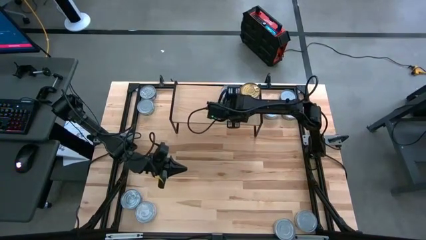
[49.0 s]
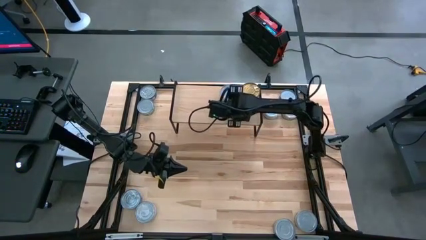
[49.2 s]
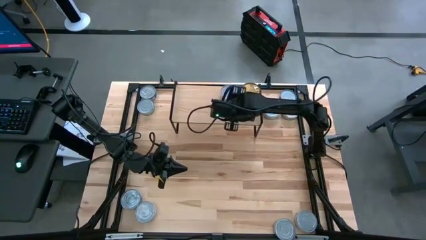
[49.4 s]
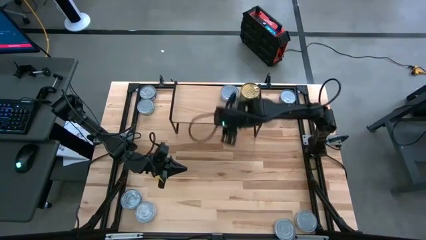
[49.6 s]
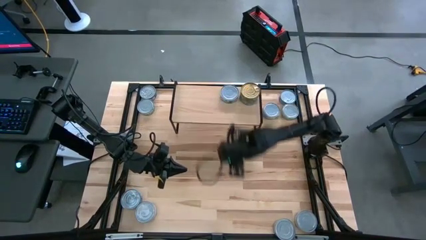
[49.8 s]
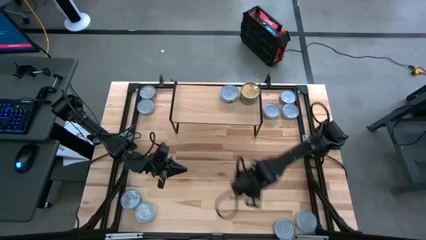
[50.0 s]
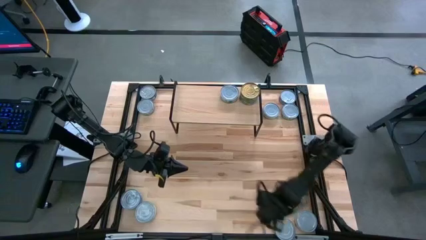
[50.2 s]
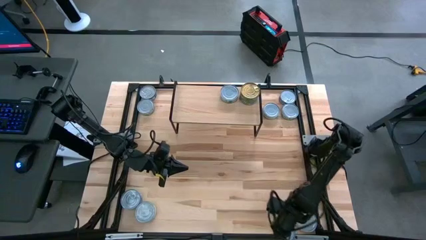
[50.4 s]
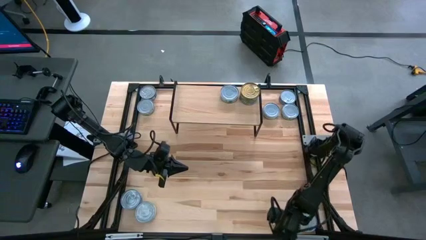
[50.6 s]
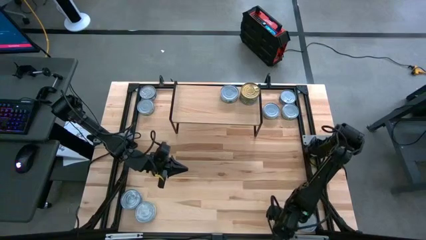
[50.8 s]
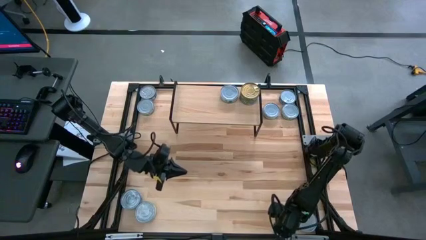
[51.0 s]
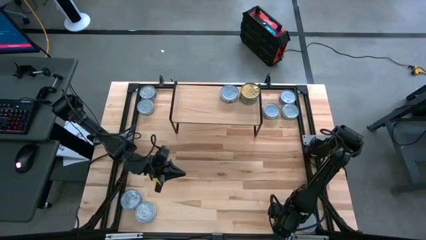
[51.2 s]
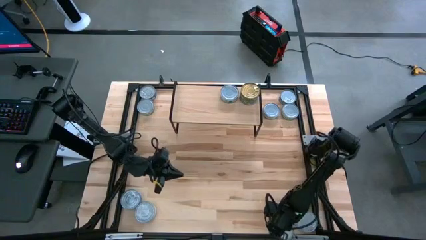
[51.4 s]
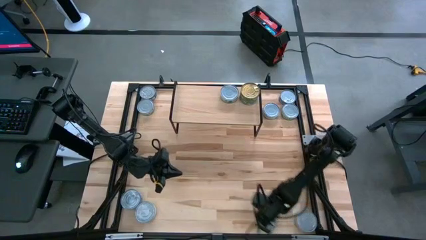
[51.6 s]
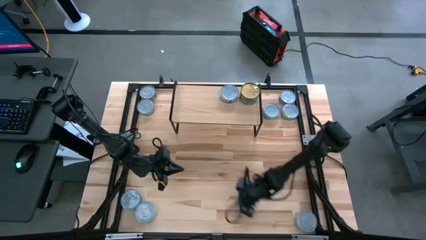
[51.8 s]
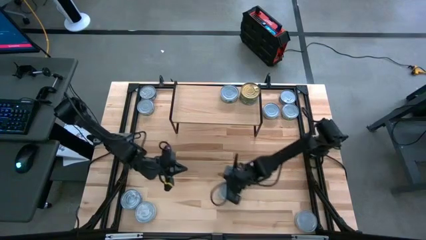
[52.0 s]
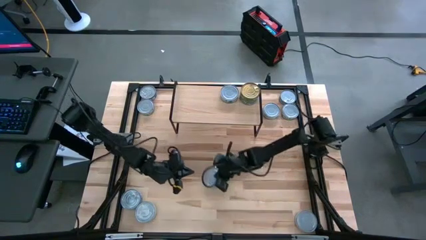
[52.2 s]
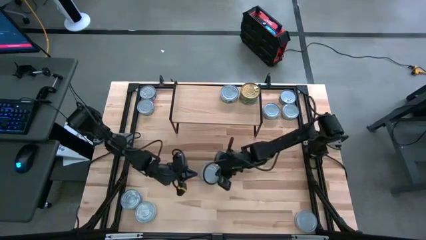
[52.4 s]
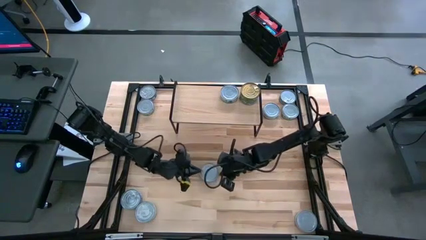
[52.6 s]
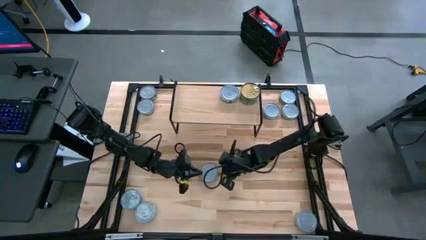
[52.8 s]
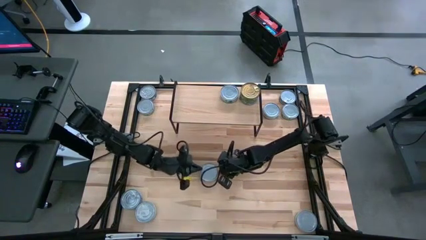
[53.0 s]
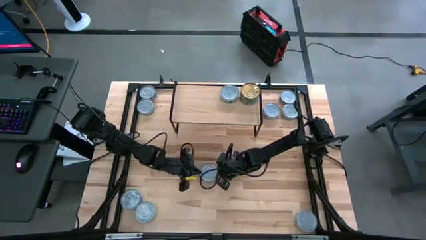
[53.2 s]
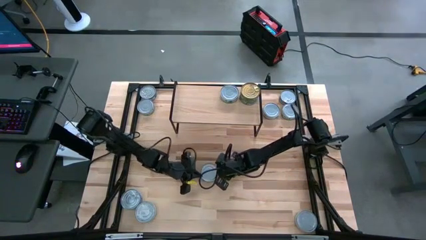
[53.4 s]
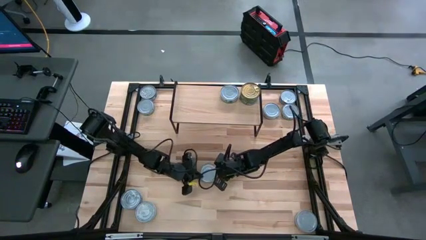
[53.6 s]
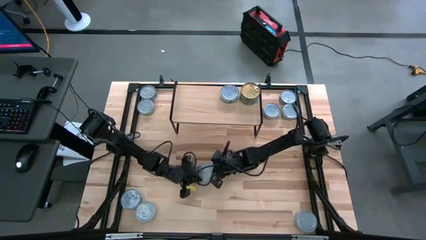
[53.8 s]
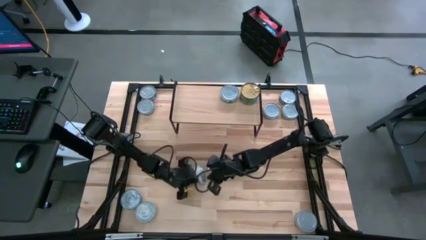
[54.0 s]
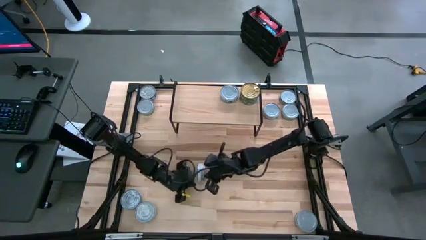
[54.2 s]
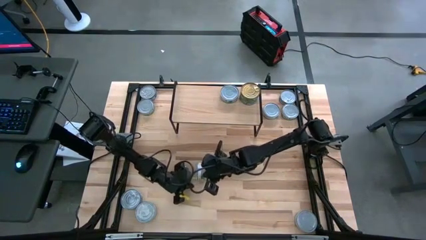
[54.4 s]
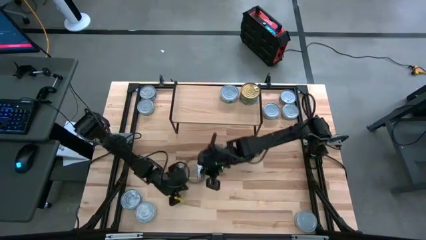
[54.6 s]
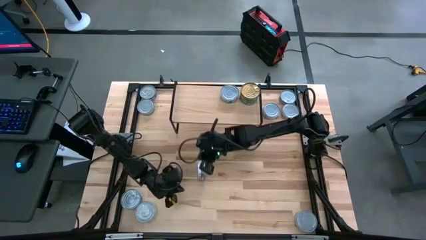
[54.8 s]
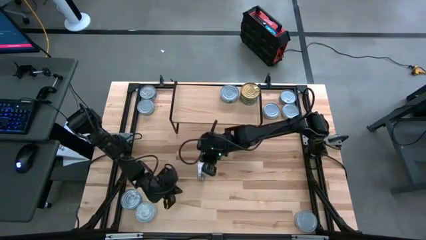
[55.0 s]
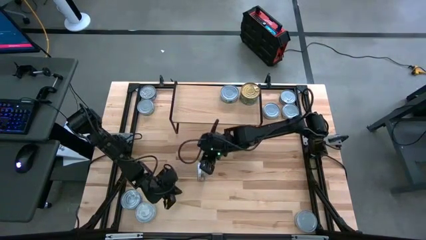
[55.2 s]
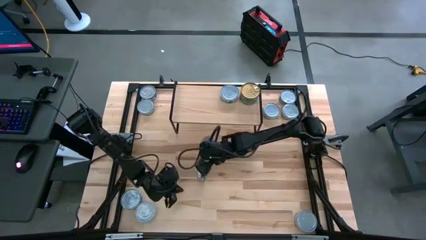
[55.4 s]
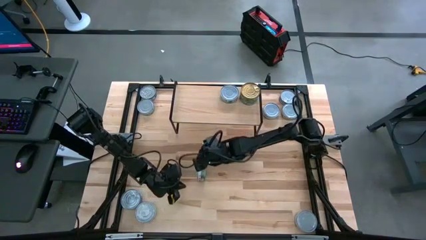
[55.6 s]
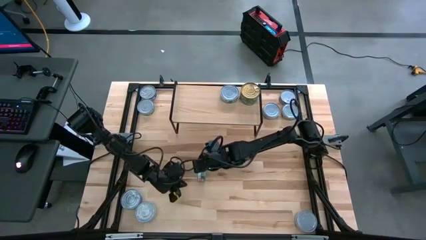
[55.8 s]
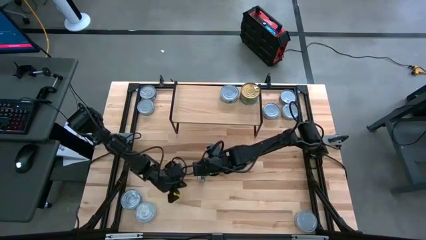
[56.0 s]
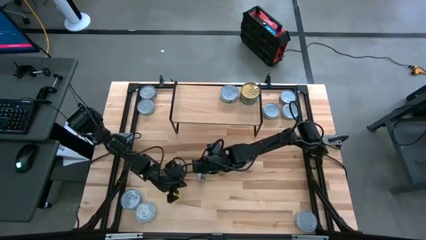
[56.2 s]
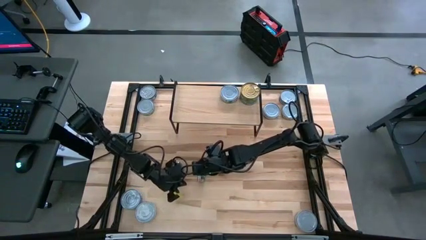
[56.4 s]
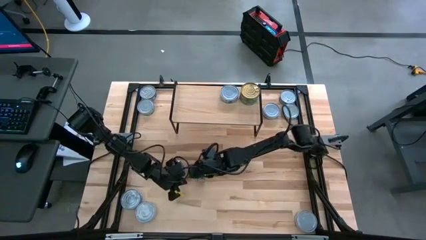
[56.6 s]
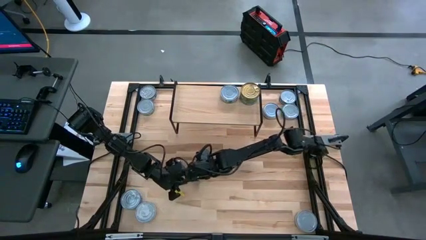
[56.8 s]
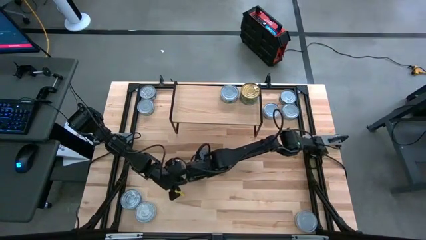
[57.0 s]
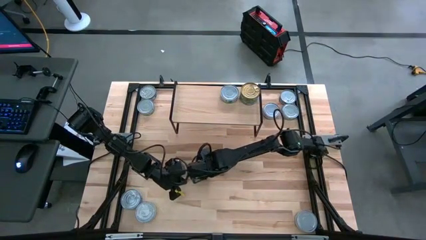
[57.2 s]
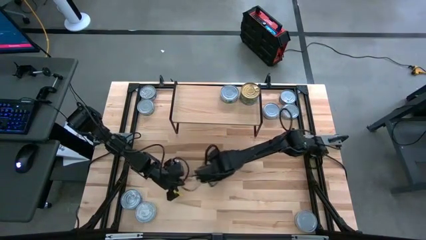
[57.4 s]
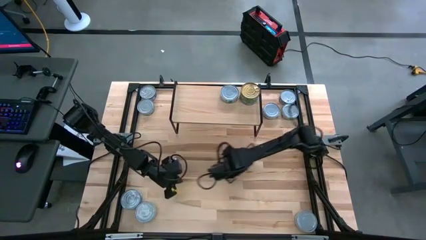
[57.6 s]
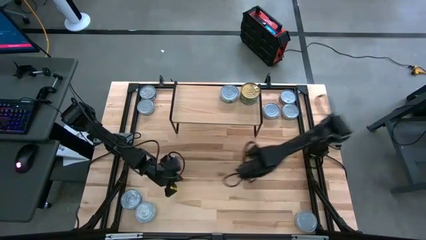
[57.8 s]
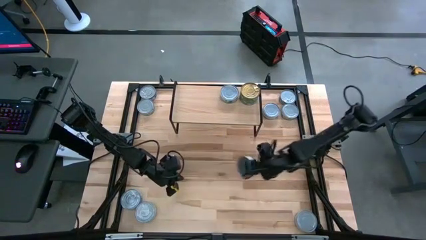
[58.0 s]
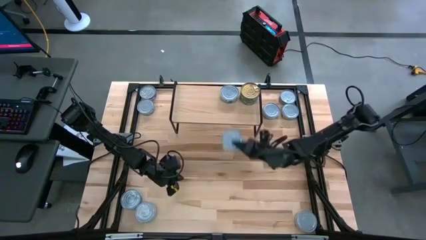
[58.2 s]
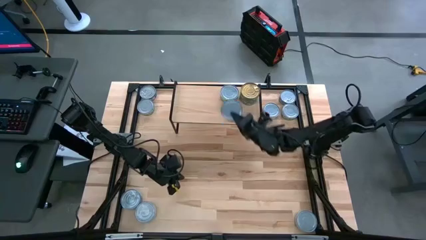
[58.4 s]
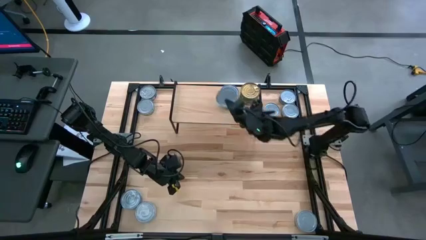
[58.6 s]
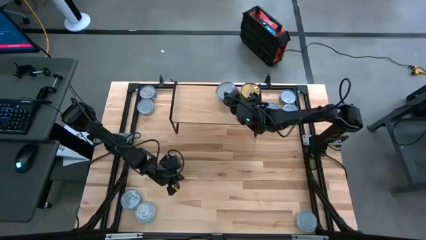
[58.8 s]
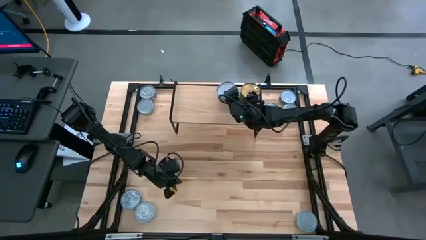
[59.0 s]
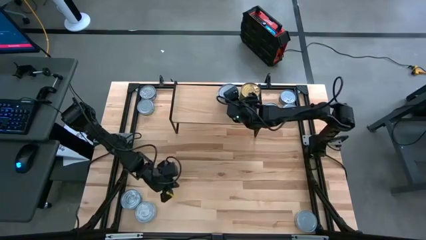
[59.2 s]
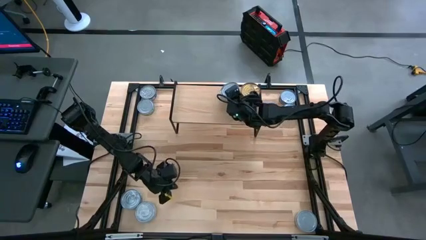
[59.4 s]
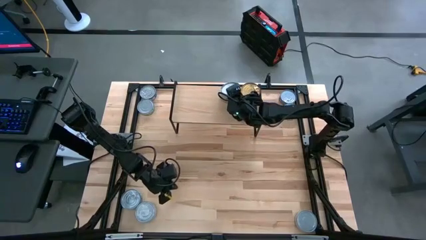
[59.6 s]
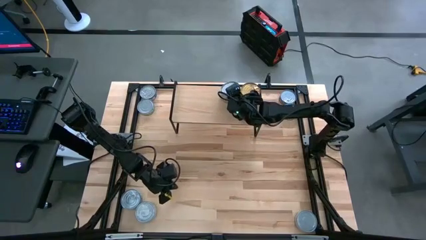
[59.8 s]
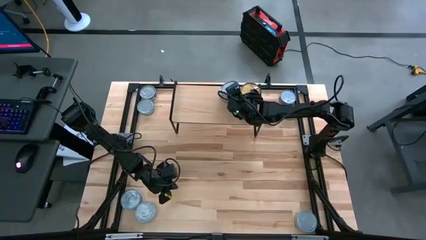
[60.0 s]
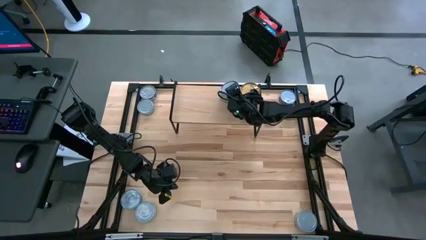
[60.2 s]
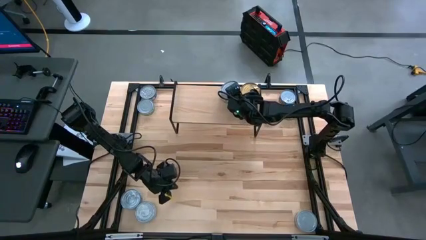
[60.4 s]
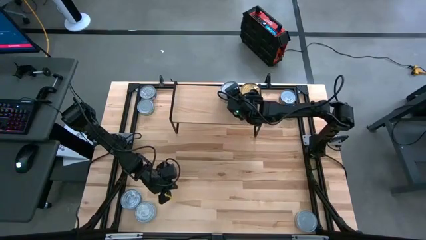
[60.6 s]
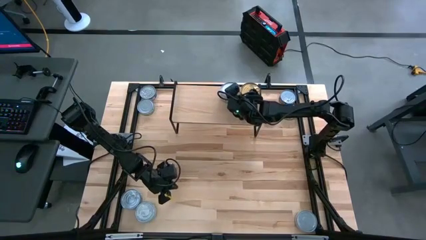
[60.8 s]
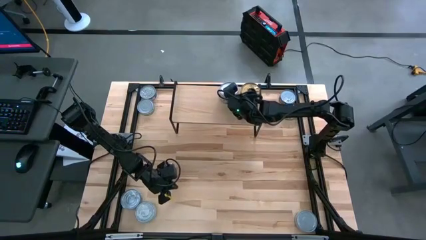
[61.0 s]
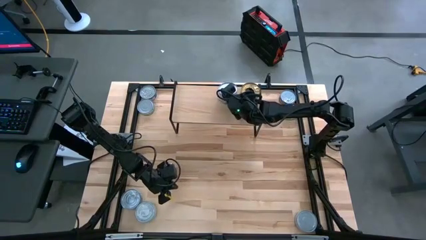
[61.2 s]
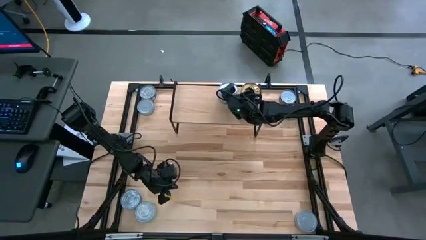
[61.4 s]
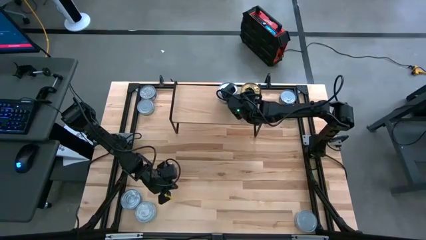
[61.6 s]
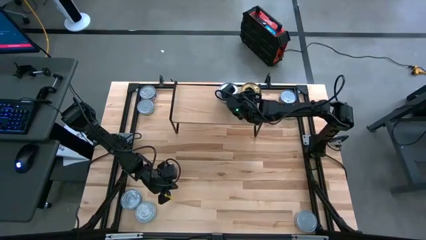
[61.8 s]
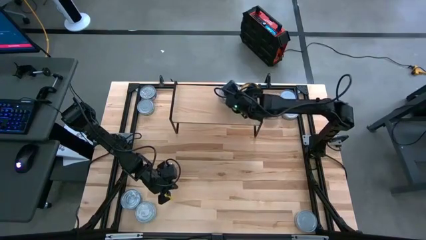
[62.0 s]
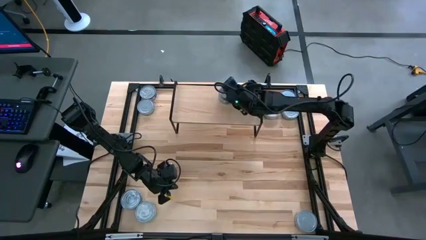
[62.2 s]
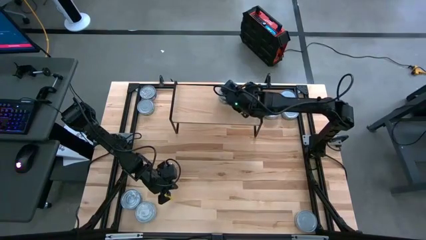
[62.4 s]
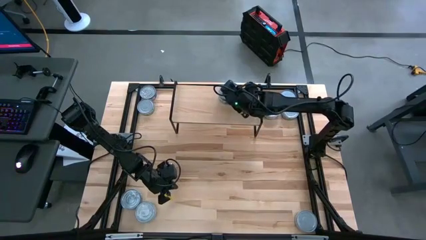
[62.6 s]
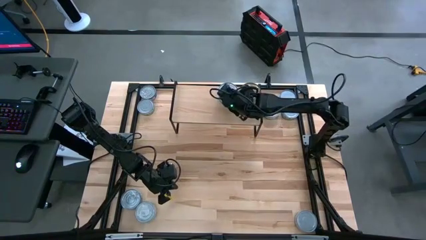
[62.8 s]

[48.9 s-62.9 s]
Task: Stack canned seafood by type on shelf
Stack the light green tuna can on top of the other light green tuna can on the shelf

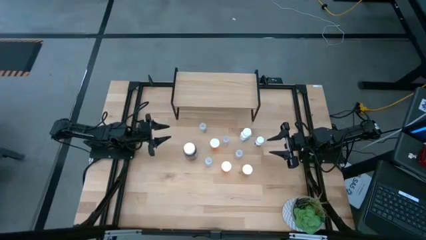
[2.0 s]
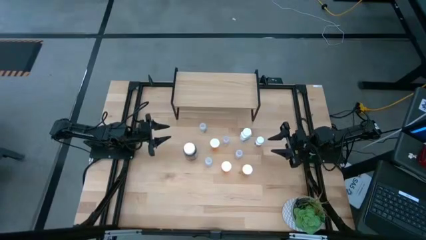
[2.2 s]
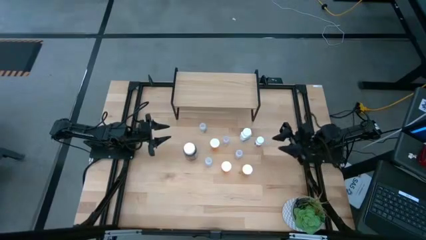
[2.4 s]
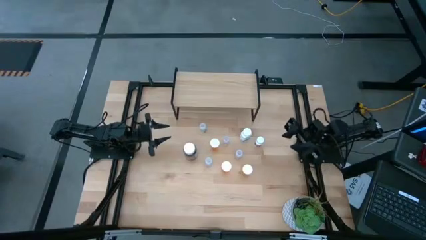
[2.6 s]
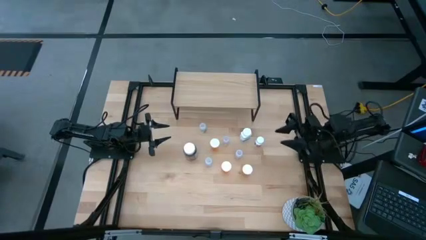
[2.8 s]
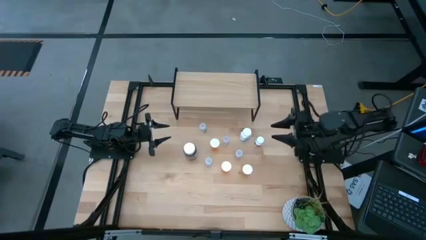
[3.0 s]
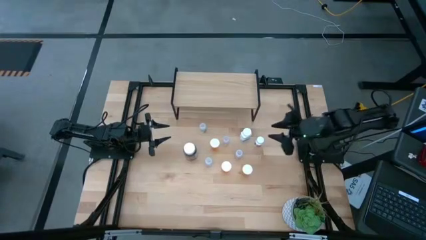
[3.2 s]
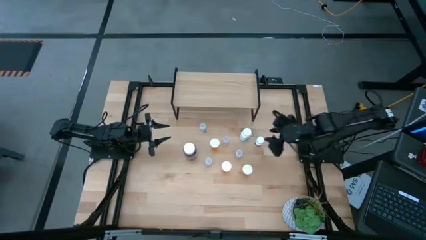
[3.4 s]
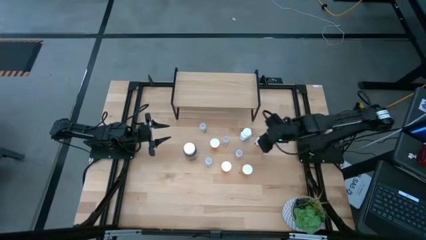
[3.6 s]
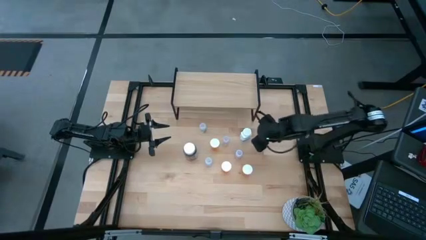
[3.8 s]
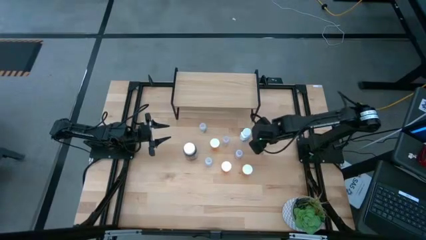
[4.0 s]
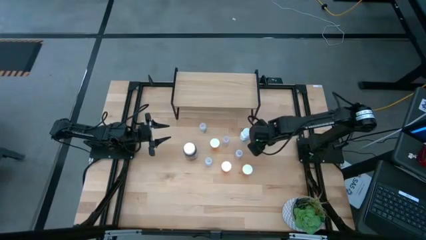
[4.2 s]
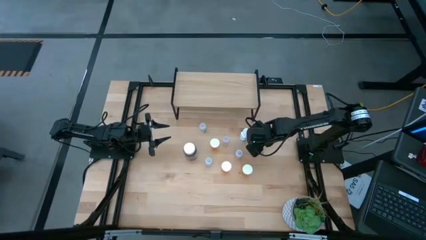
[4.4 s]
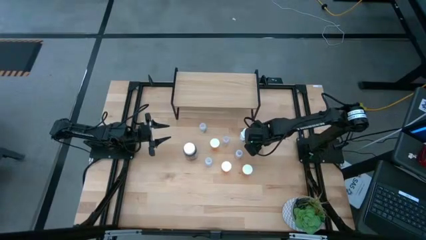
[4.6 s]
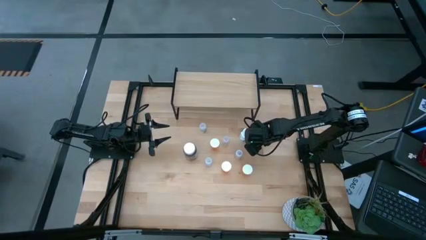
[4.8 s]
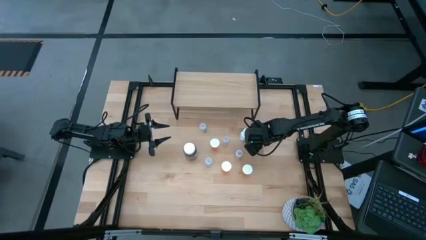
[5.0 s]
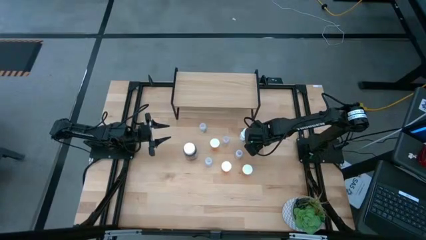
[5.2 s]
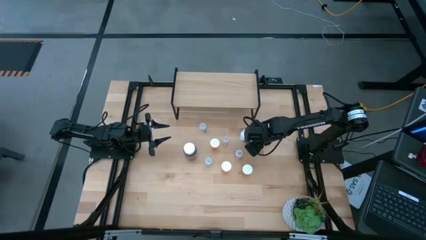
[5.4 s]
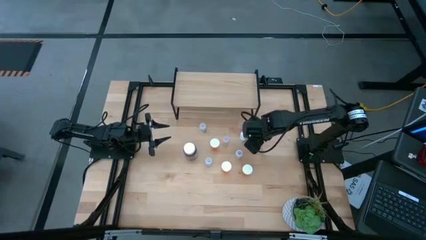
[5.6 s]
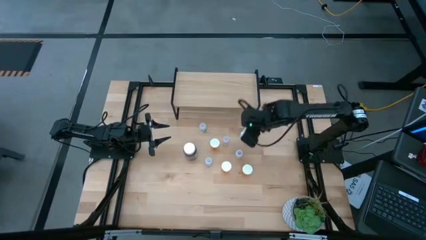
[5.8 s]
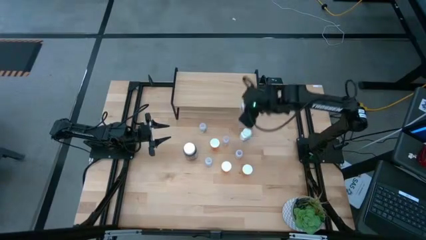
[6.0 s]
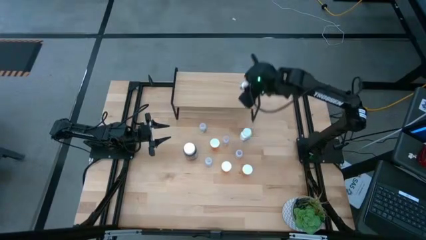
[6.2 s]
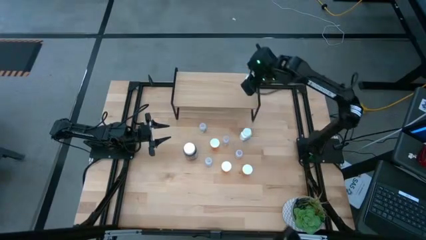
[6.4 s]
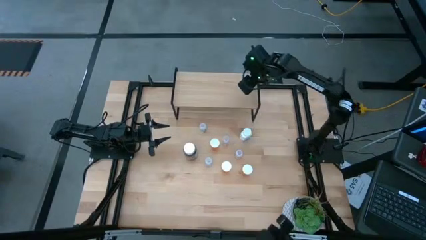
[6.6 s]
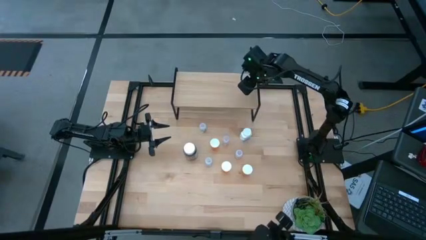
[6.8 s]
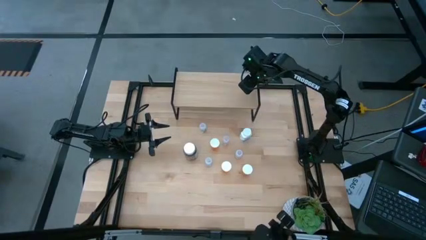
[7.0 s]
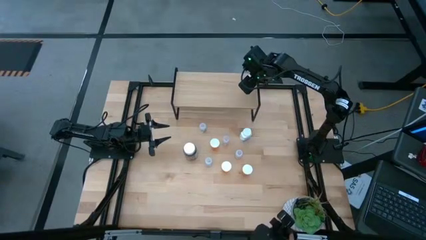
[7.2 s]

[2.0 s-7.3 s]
Task: Pick and place medicine bottles onto shelf by color
Put the black pill bottle on the shelf
